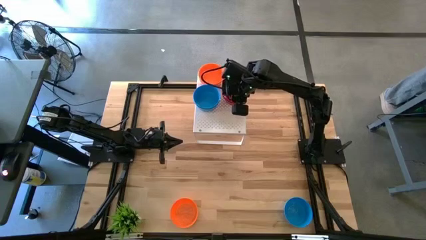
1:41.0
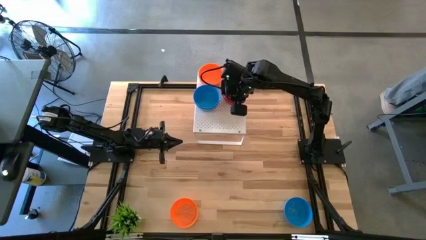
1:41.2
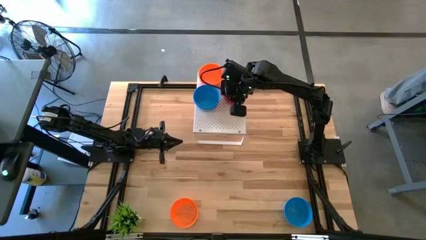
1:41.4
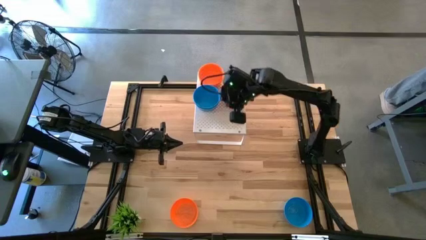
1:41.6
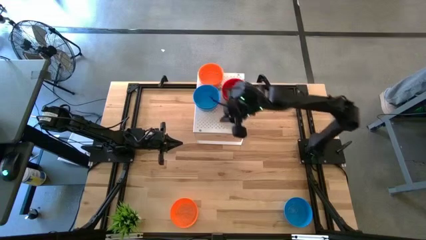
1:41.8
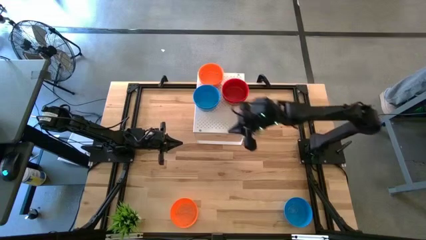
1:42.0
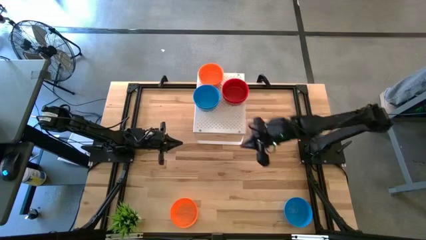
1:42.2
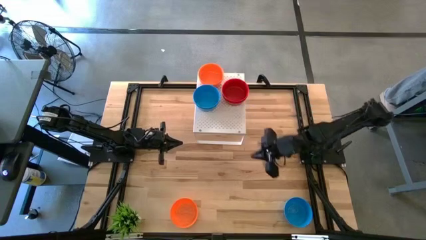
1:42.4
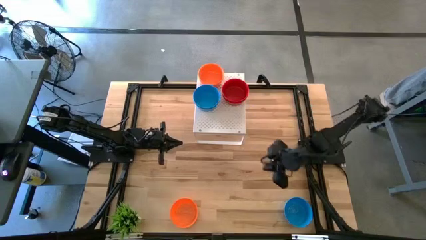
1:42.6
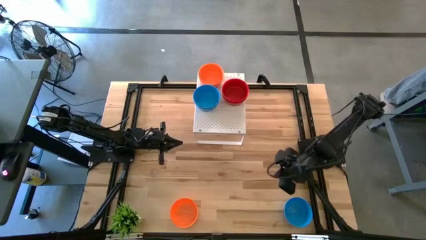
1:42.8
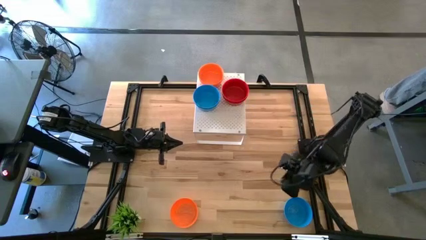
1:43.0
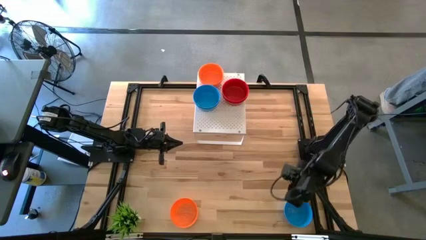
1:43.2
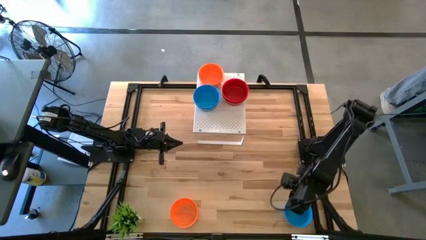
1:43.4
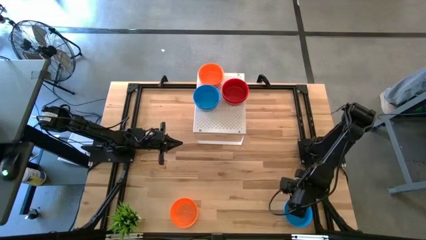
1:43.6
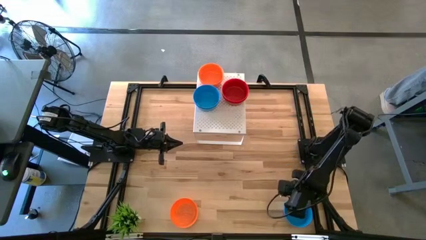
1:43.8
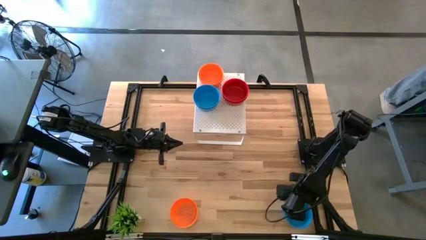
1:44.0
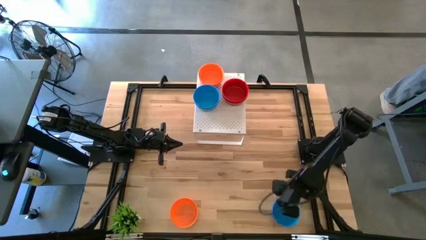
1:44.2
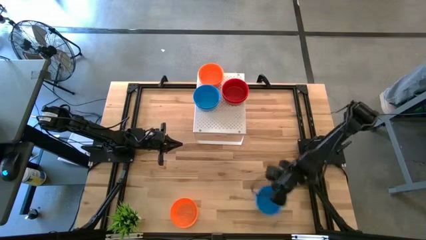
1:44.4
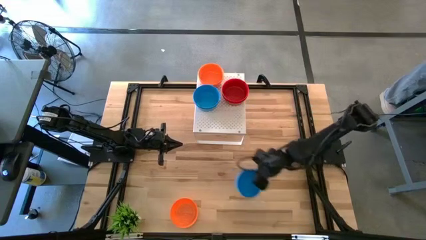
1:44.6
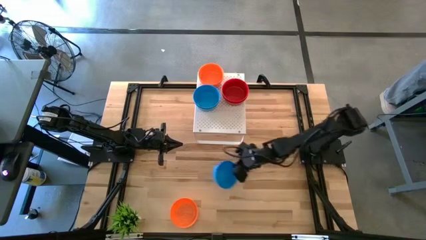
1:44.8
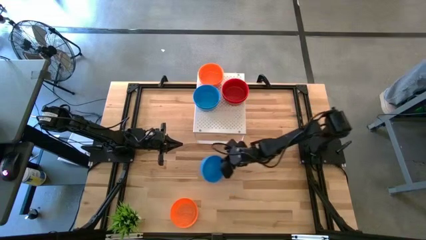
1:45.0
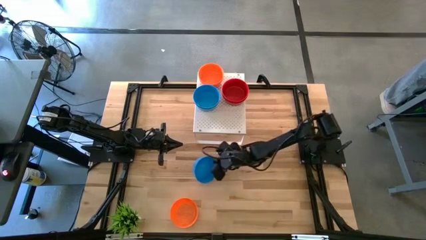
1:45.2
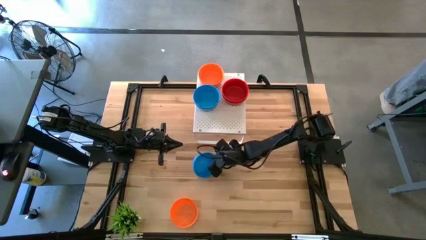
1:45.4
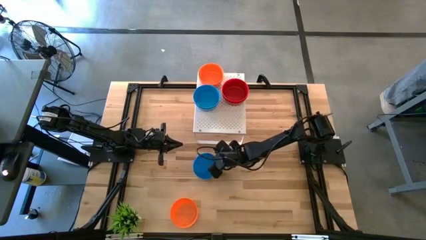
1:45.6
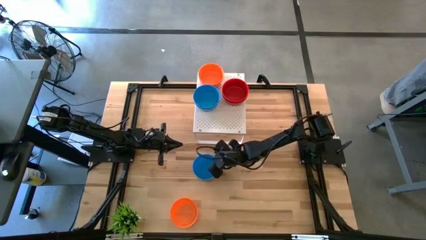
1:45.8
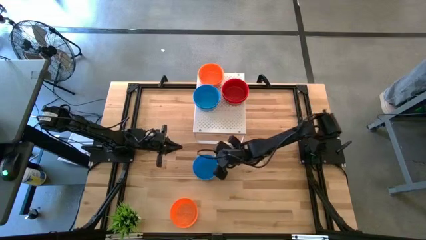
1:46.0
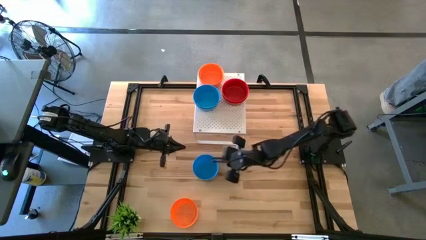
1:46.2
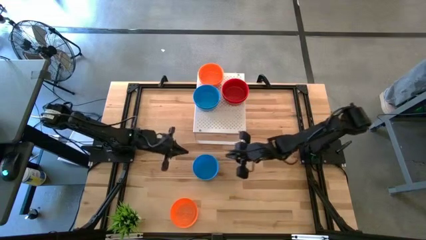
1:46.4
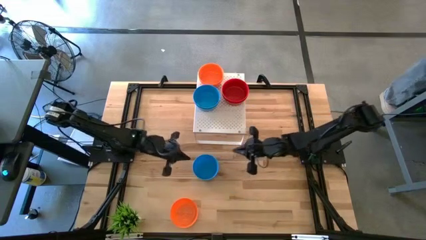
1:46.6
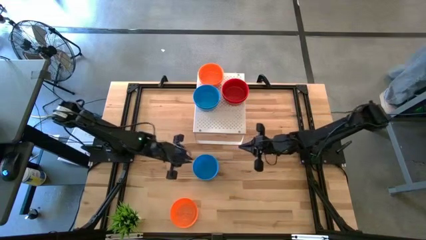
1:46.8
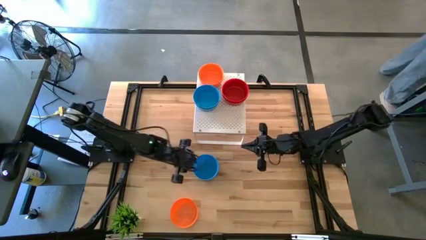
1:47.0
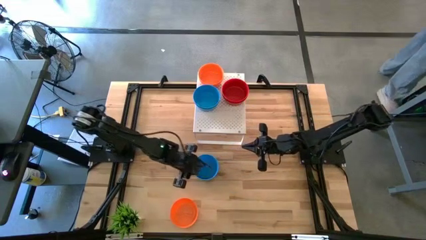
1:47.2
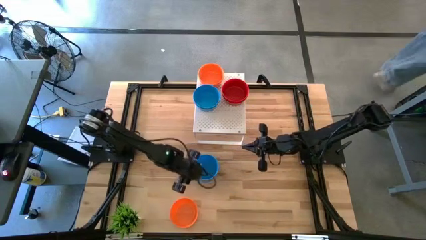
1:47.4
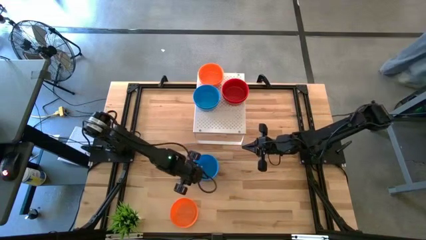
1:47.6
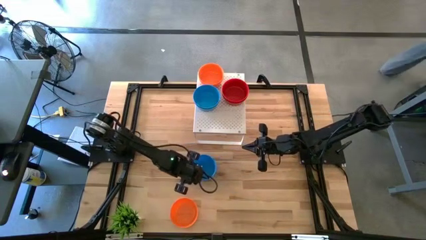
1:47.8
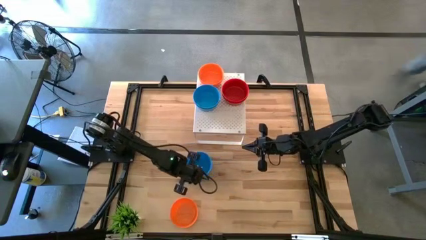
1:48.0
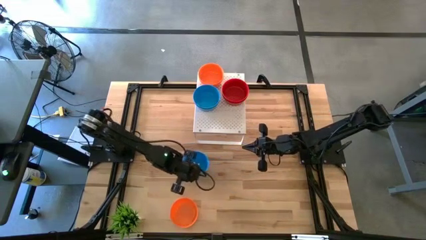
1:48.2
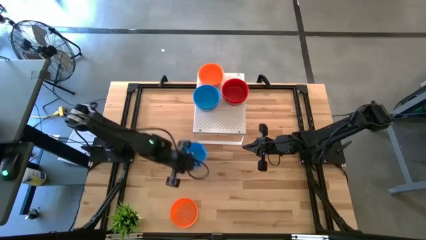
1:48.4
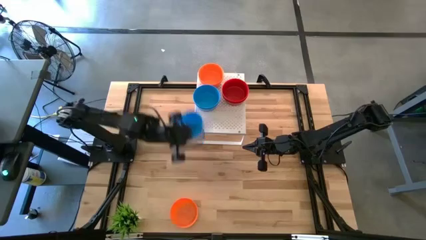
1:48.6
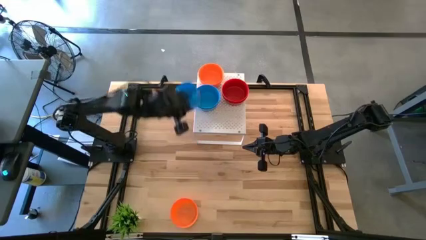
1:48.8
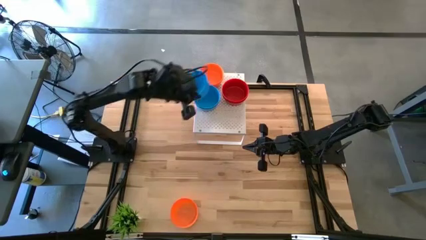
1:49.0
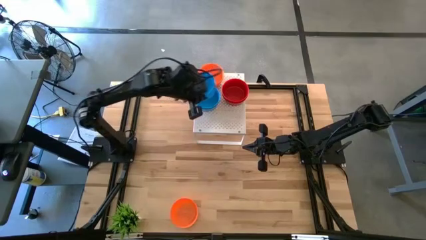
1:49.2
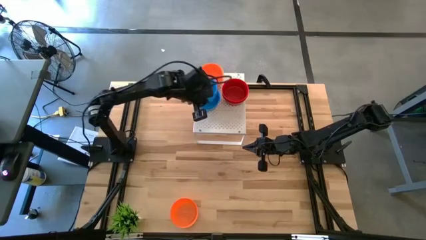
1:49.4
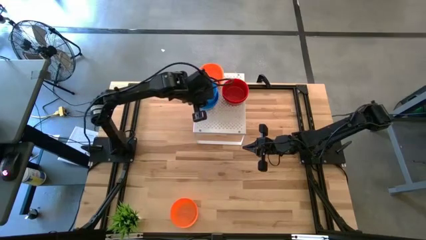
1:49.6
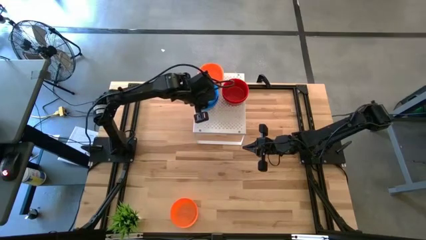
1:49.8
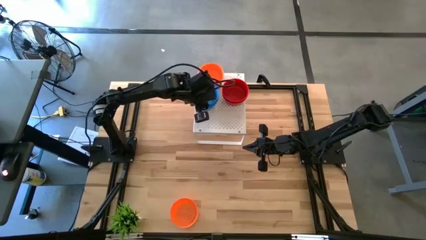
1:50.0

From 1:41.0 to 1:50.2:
Task: Pick & Place Mini bowls
Stack the blue bowl on top of the blue bowls on the shelf

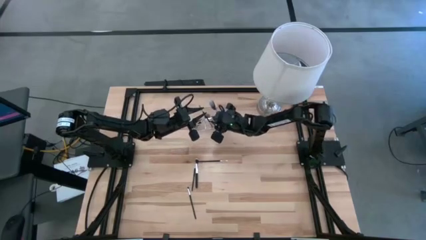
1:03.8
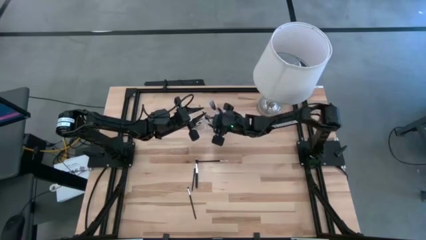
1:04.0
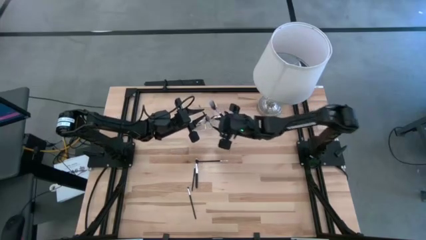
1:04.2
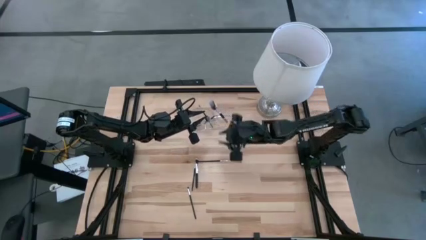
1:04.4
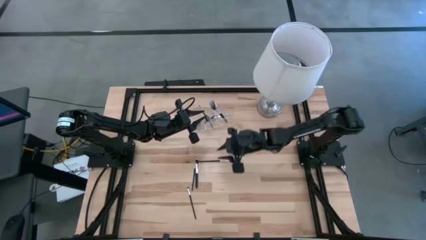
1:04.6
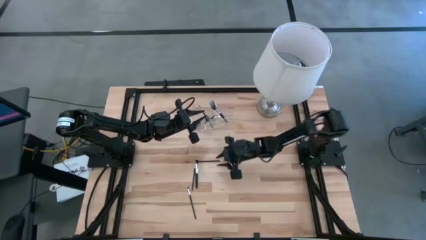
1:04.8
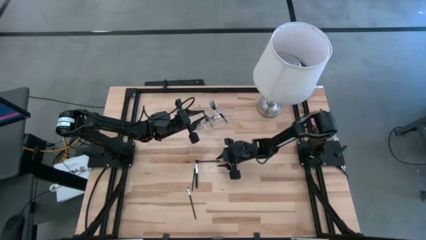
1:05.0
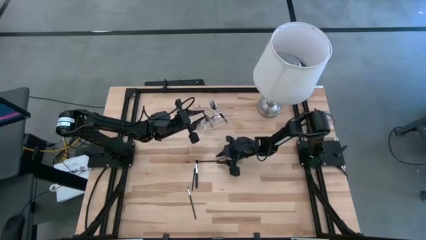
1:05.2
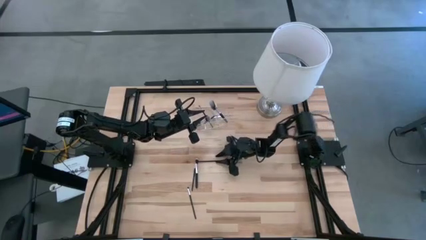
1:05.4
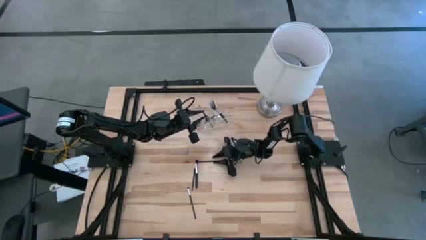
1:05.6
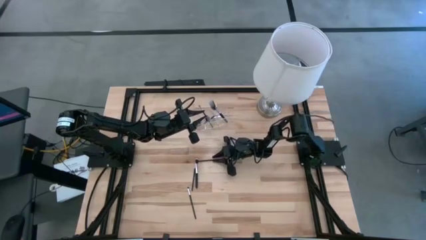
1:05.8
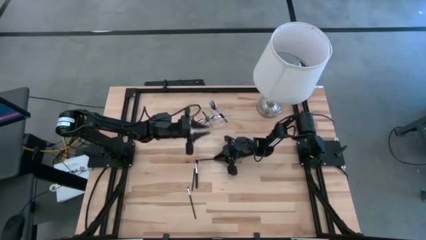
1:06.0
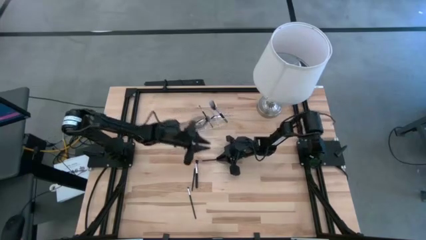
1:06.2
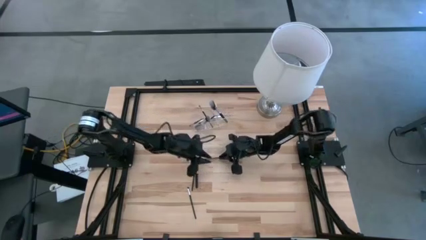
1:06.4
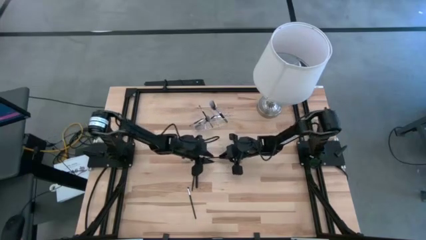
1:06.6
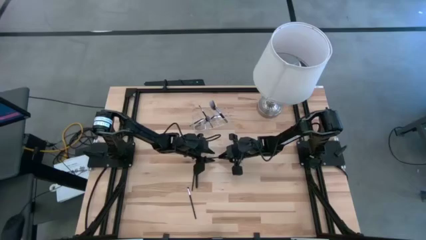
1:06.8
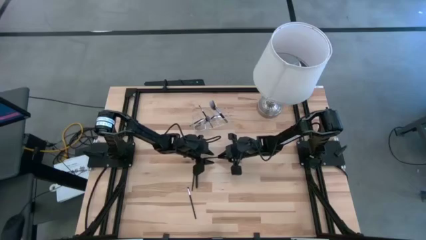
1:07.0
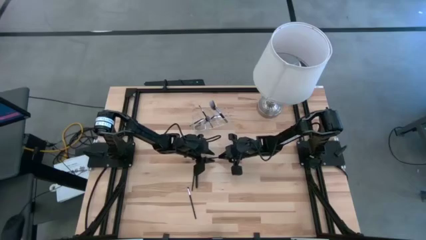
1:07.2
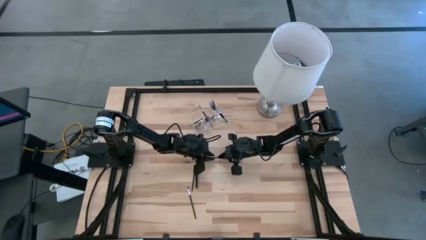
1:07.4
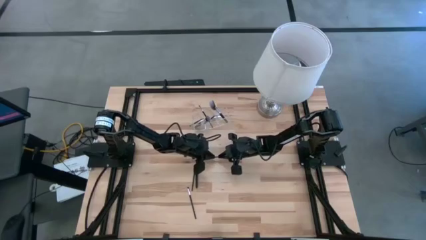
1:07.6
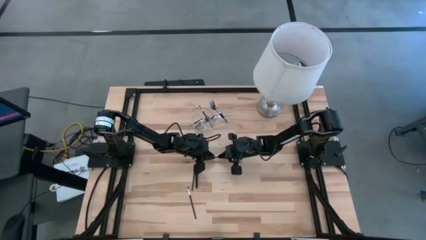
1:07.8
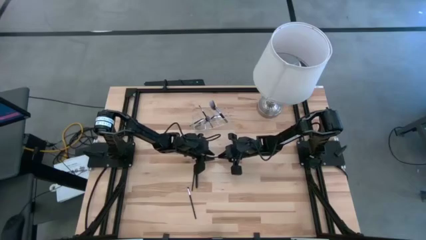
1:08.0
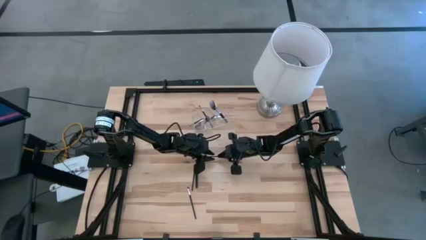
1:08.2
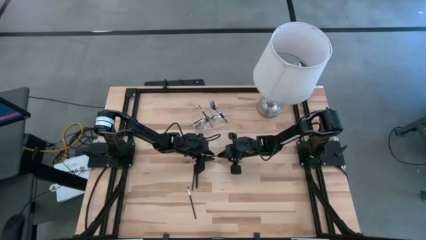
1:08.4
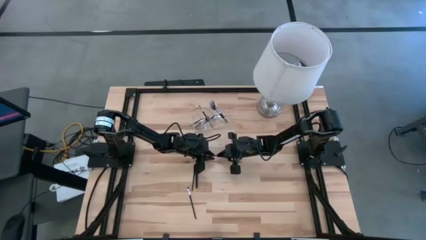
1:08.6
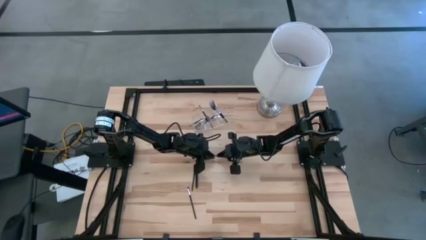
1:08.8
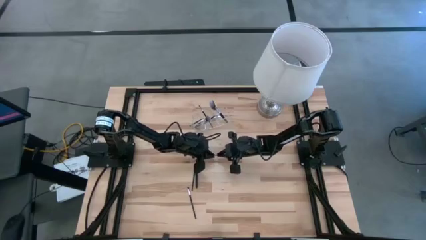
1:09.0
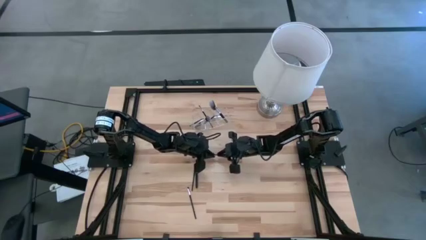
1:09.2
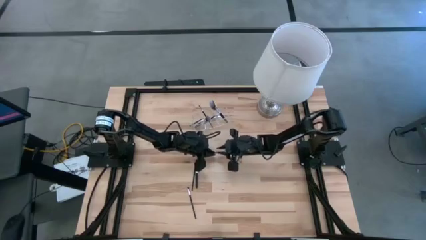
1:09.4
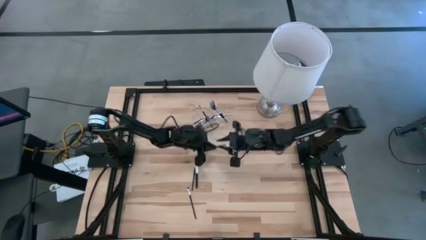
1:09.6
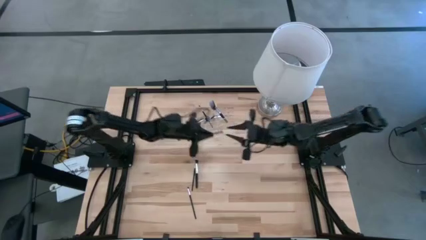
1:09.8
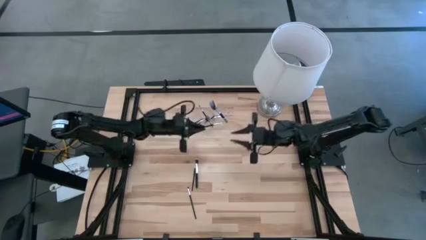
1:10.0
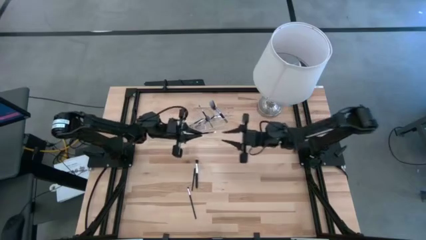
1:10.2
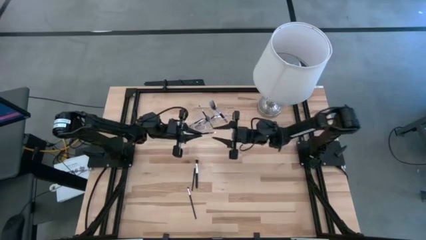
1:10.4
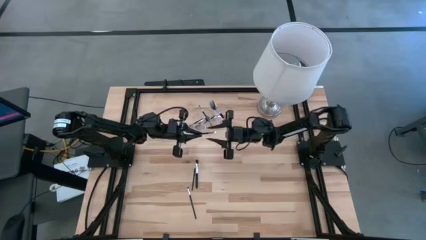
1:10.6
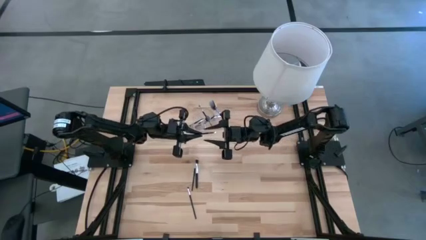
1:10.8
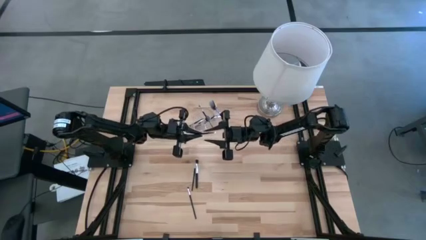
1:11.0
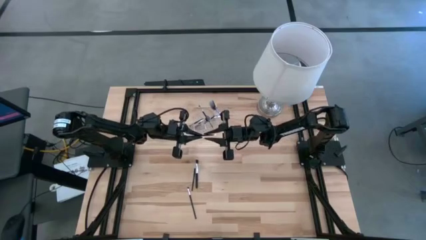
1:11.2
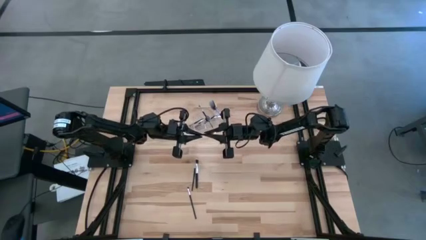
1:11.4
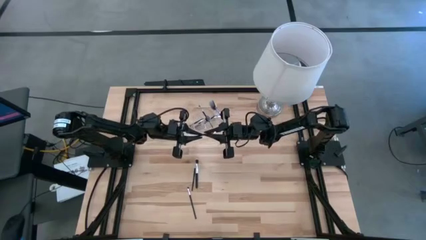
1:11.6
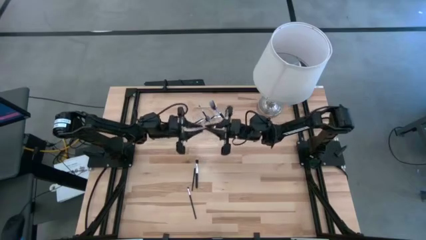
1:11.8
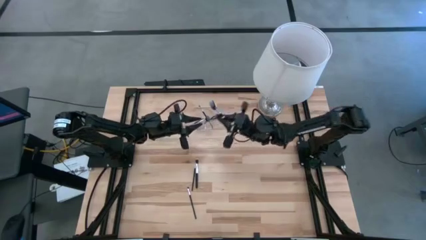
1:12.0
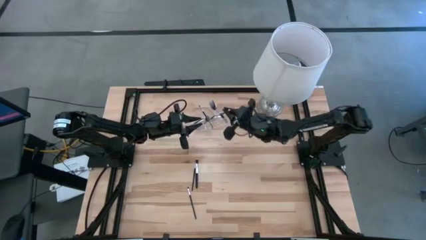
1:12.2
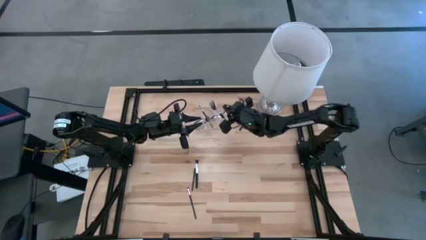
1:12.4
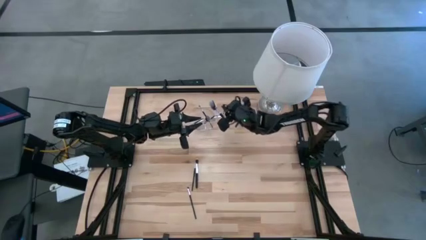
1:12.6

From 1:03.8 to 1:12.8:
Task: Sort items
Put the white eyeshadow brush into the transparent organizer
